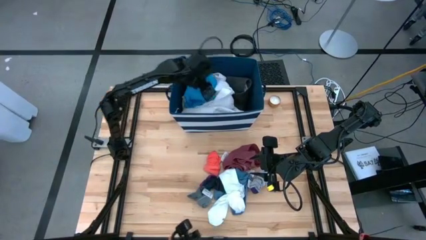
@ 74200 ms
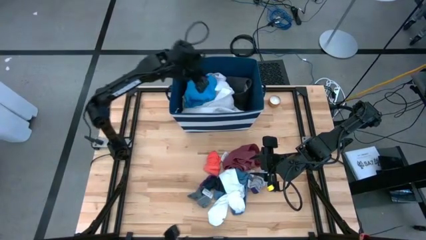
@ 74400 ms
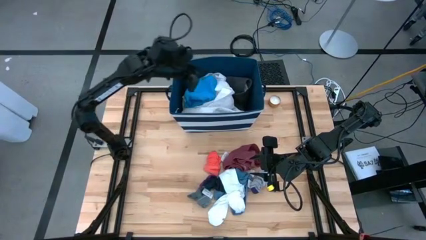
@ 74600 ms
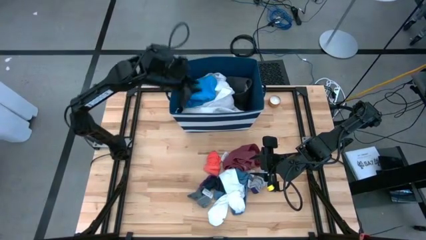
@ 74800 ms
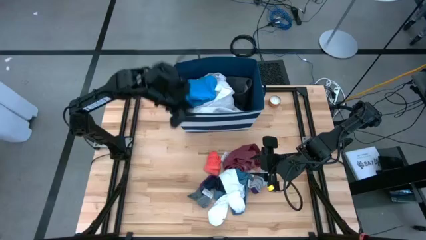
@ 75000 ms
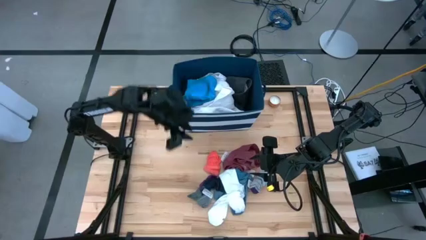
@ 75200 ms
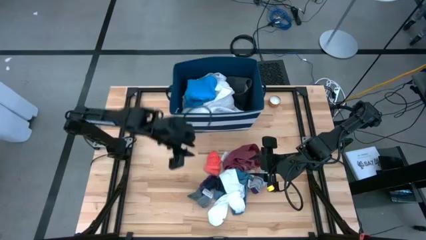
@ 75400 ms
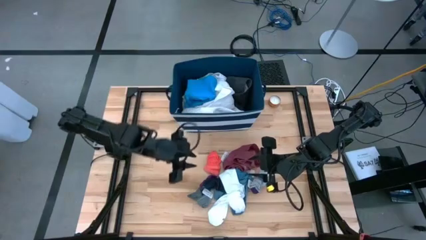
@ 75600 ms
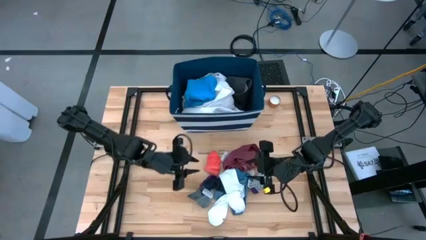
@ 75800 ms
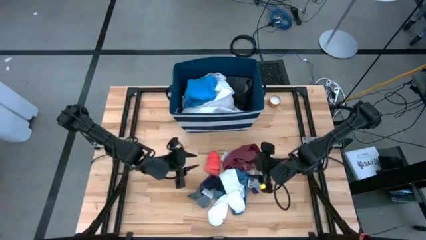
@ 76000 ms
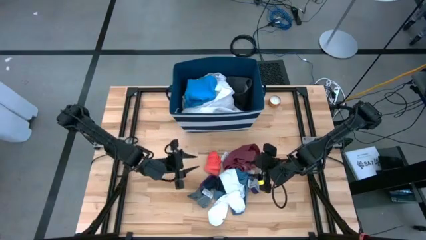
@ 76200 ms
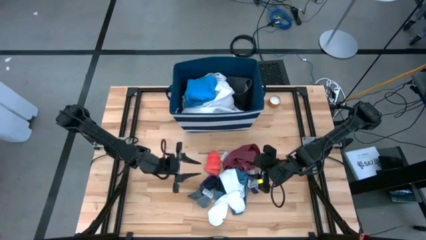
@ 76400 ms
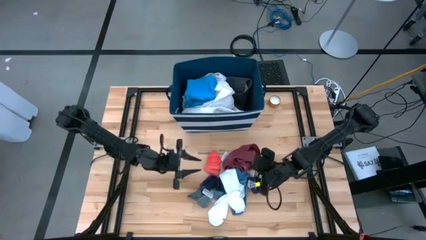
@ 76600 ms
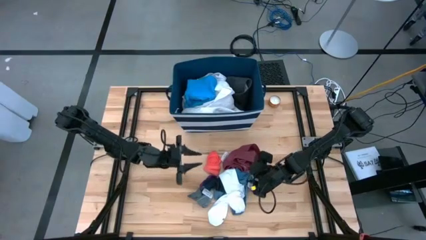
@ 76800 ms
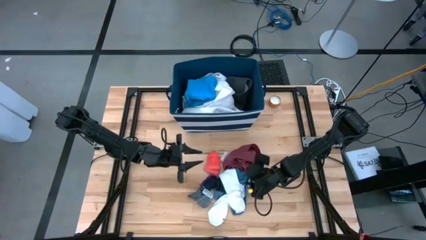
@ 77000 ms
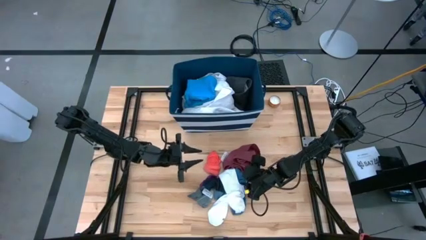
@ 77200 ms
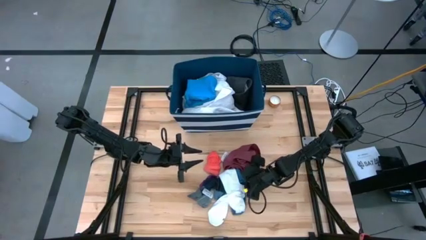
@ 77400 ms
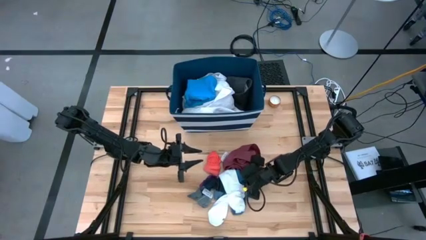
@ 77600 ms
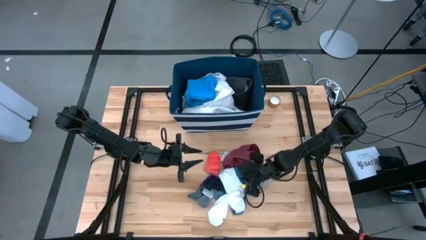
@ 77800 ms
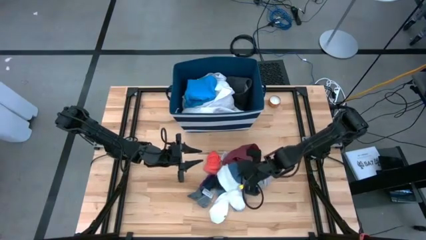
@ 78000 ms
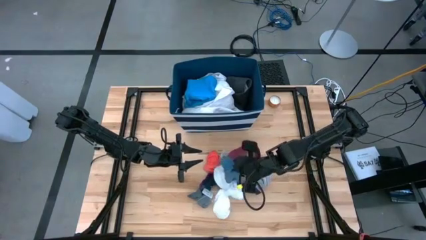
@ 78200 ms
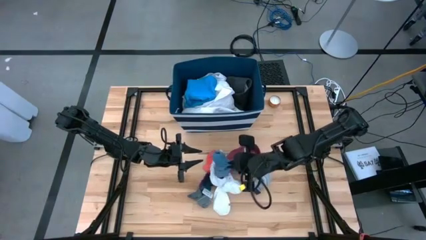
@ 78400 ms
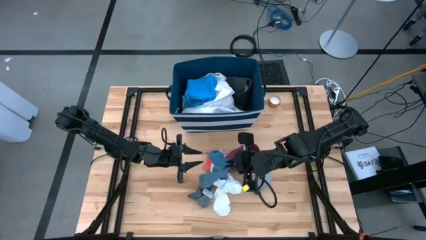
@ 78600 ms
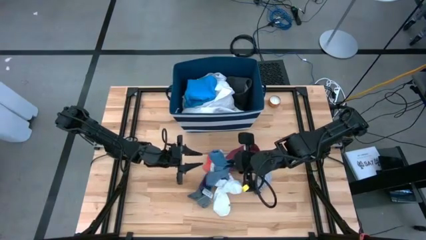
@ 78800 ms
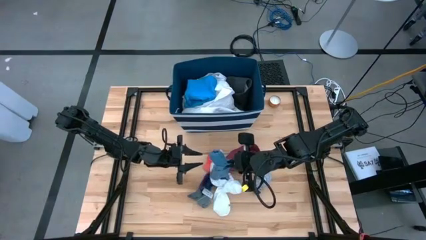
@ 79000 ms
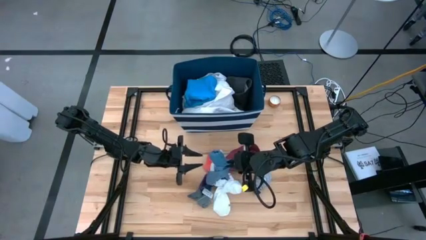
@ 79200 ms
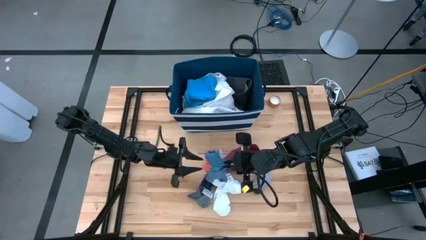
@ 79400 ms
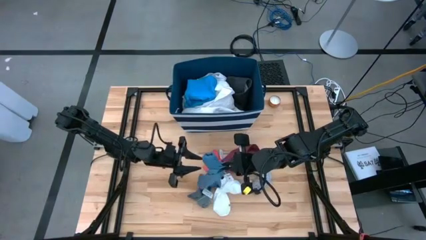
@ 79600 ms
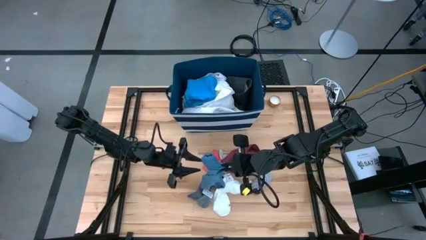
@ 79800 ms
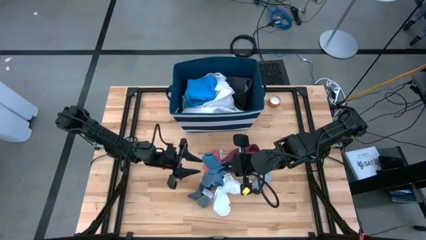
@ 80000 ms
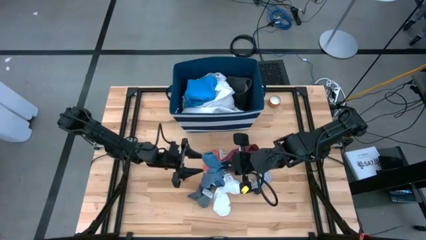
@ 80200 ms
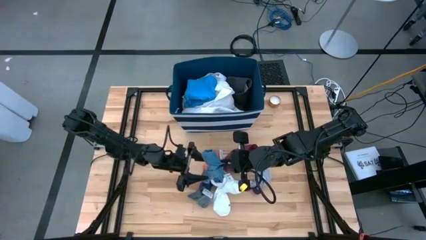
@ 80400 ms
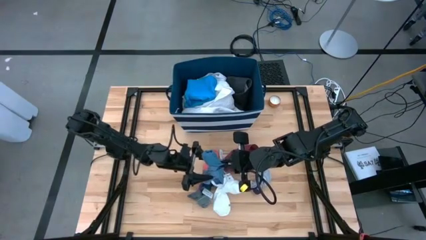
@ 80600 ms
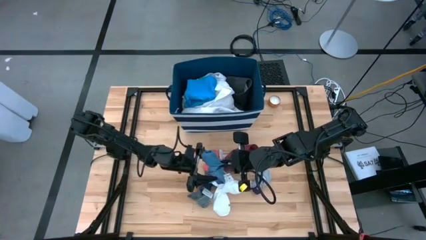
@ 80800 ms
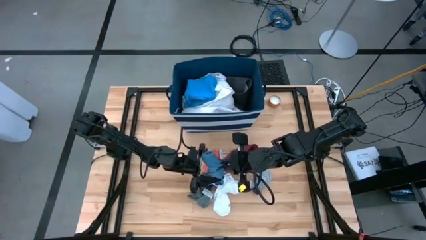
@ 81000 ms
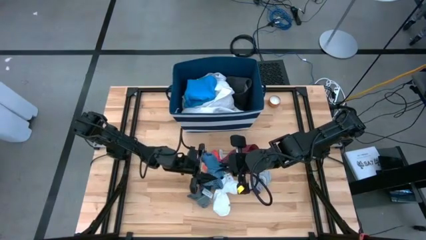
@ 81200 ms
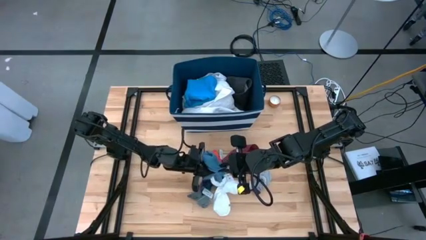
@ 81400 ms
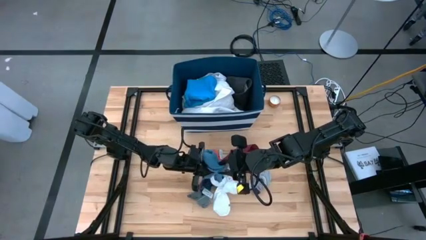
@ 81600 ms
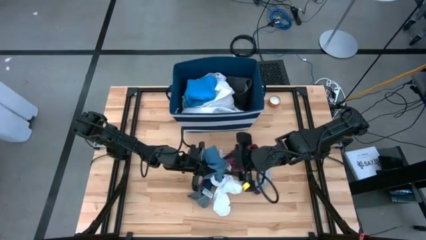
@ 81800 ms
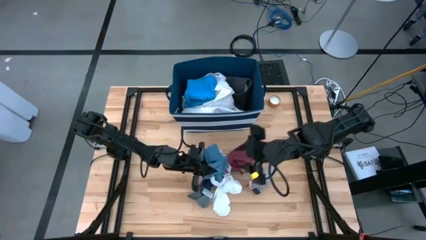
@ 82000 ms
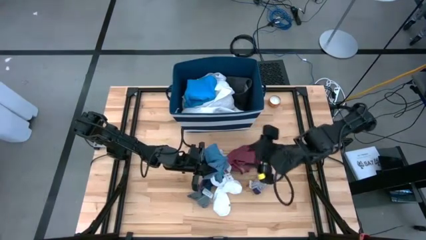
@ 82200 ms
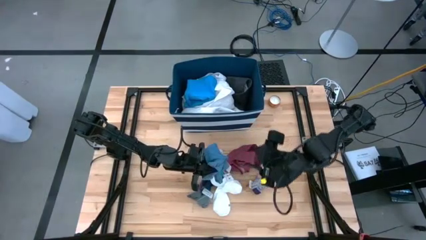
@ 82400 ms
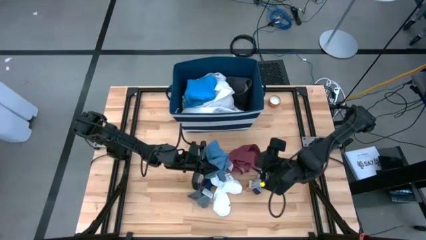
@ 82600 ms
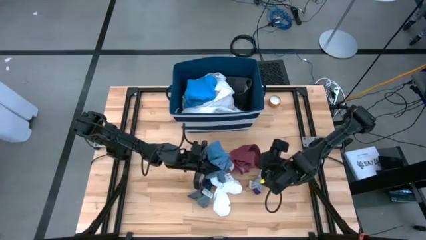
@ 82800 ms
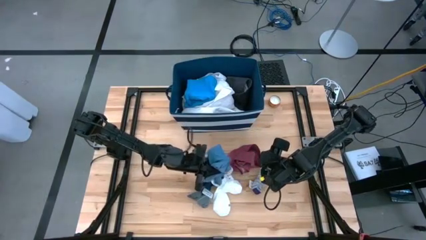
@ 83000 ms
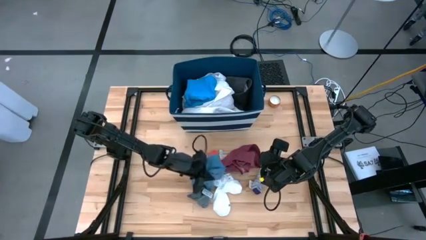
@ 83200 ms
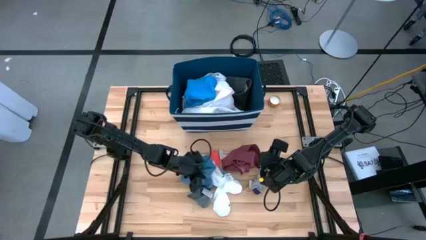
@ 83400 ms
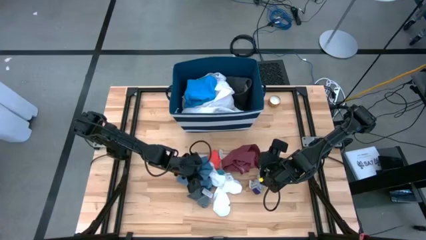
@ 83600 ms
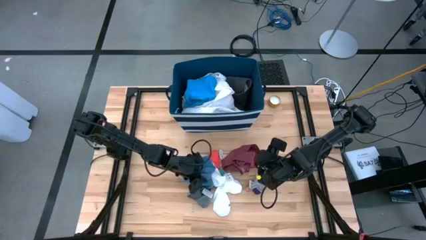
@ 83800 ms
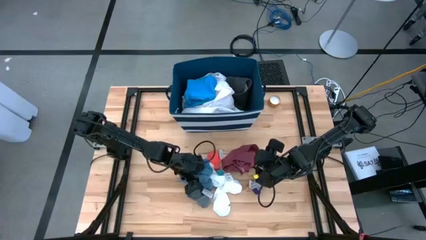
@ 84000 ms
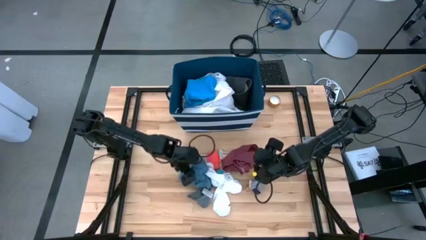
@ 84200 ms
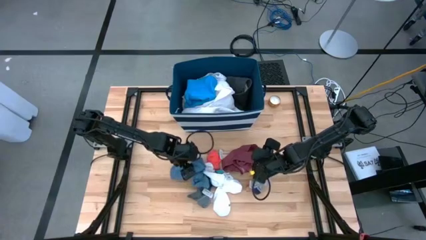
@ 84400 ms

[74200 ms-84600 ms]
Task: Sort clothes
Move the blue pair of socks to the center of the table

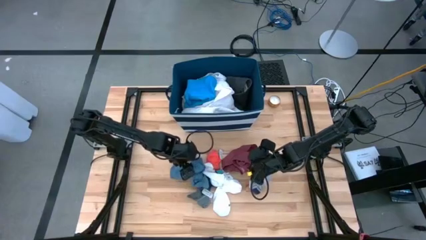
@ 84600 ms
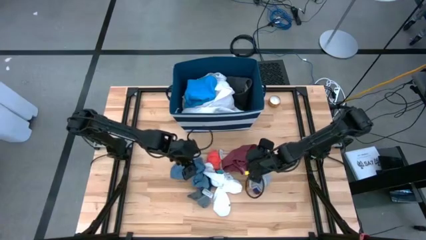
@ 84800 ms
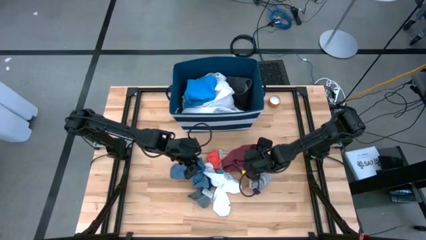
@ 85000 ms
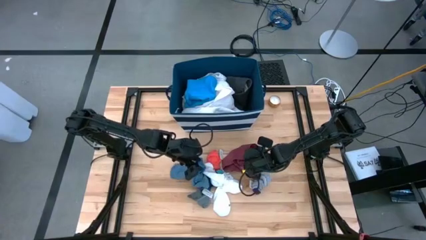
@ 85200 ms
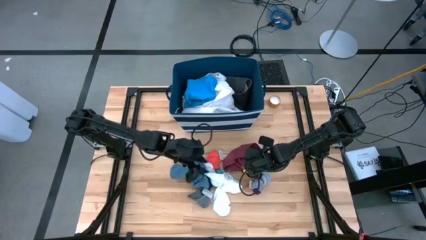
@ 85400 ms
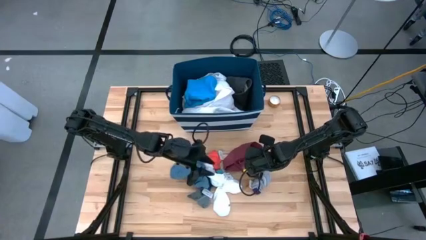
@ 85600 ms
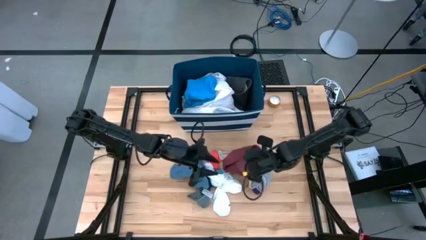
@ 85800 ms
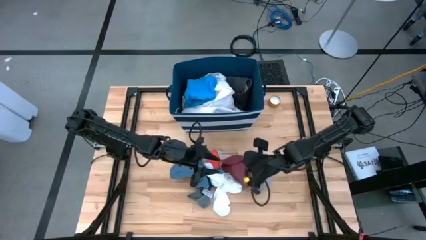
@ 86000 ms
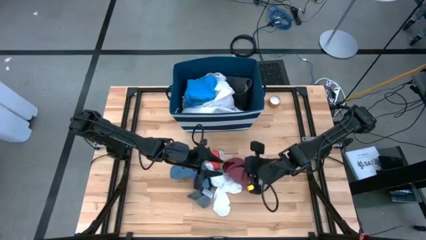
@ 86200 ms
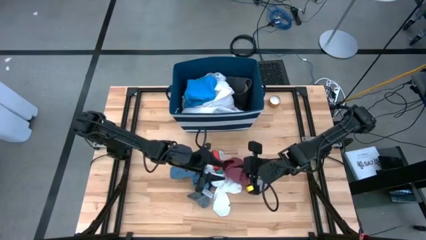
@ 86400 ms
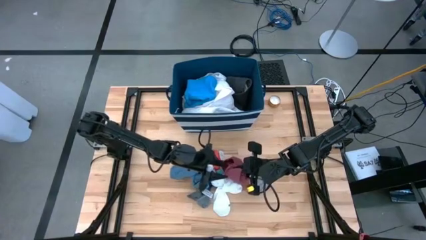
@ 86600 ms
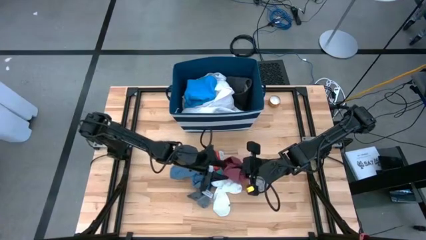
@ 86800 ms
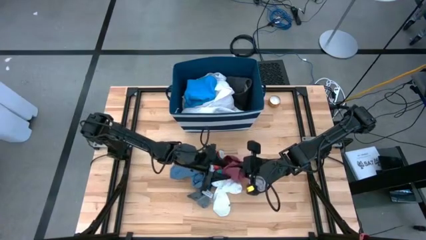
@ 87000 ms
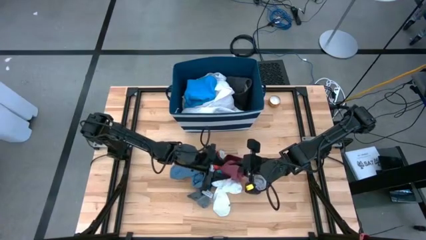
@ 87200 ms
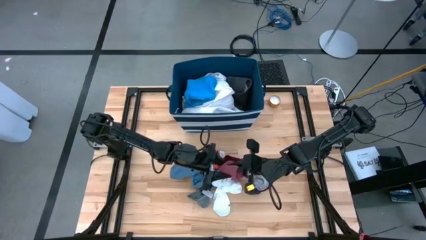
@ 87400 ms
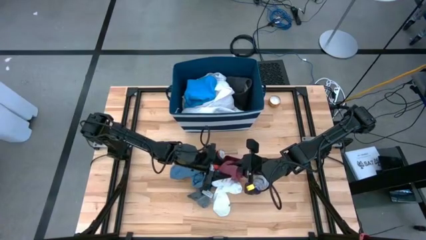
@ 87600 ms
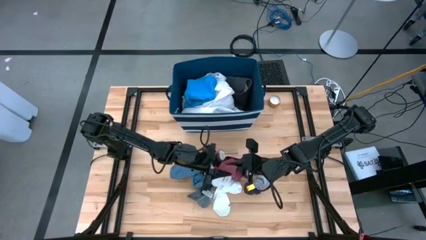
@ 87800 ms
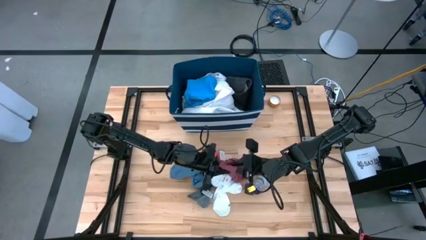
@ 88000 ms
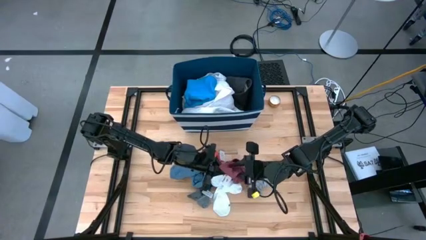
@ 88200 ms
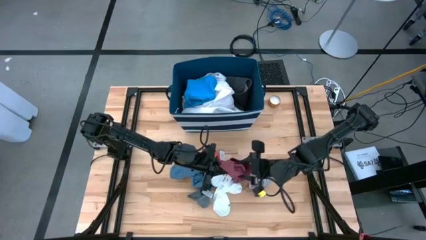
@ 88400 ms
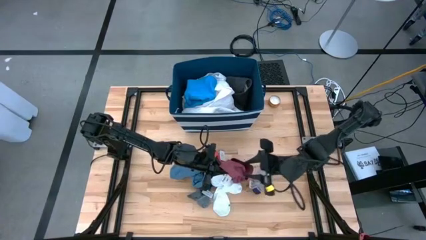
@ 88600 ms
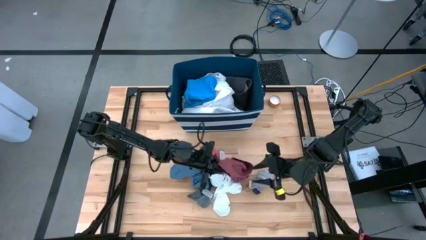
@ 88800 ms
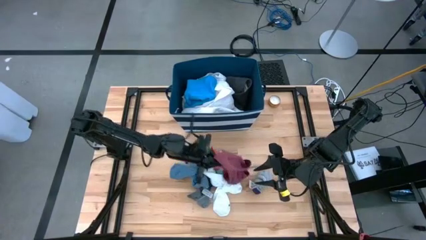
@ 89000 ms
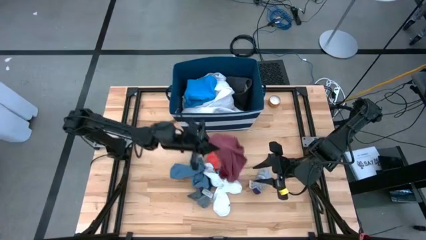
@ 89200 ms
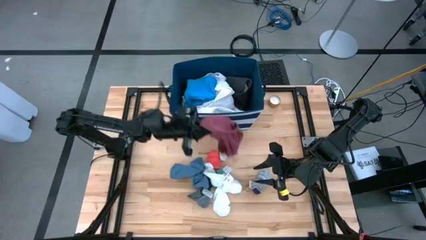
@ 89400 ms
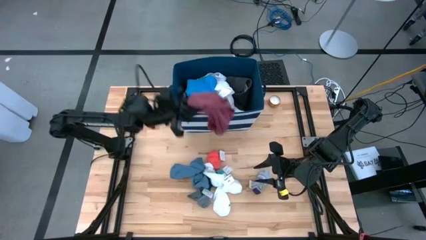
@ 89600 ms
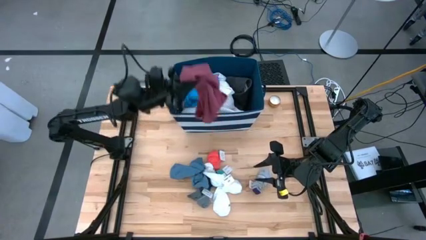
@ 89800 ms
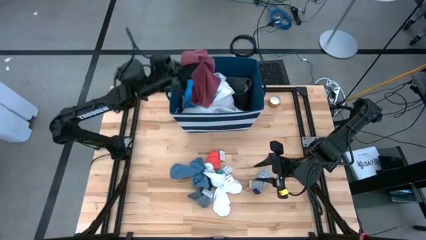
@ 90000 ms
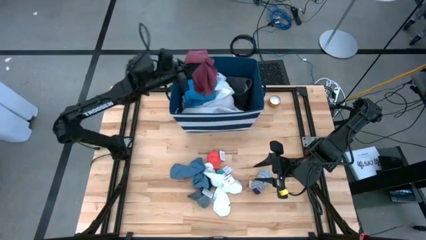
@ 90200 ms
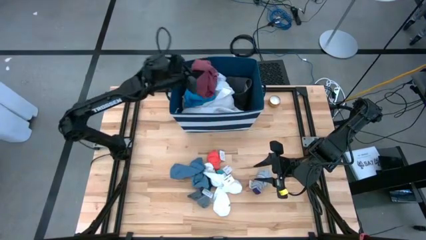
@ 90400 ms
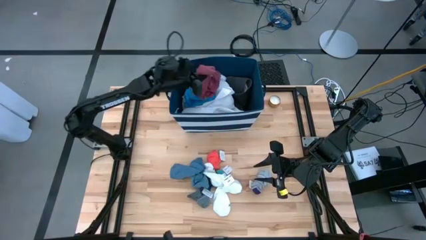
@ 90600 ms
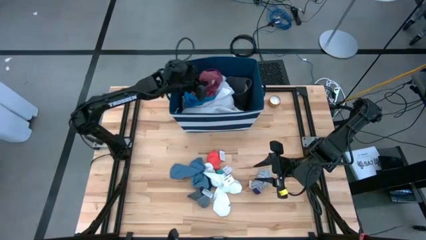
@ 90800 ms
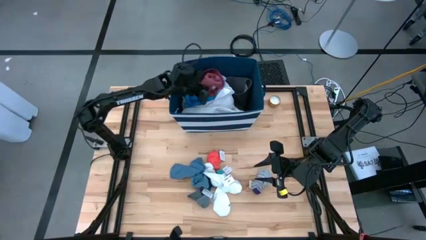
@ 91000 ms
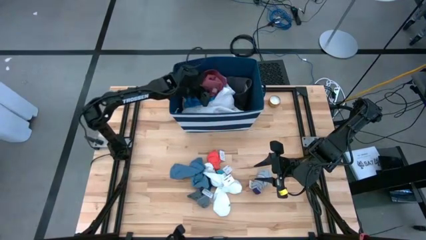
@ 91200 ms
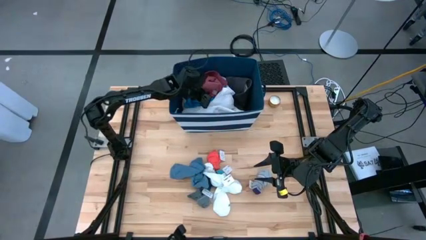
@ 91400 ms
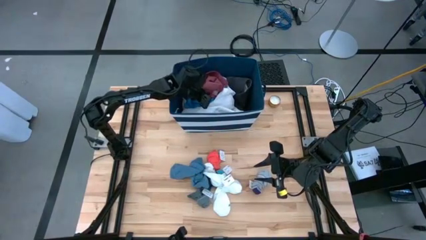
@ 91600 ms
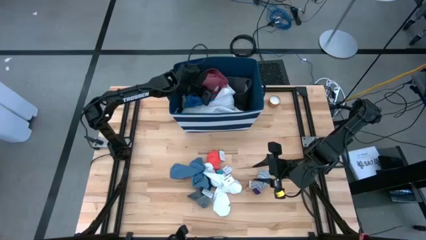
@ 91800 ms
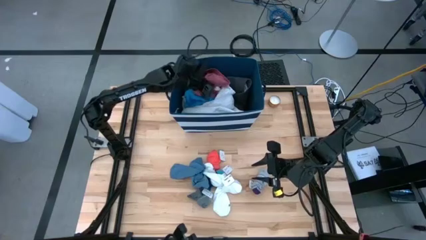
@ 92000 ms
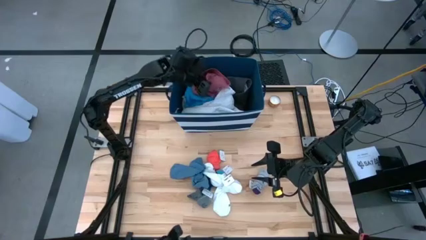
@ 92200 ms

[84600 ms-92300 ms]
Put the red underwear into the blue laundry organizer
